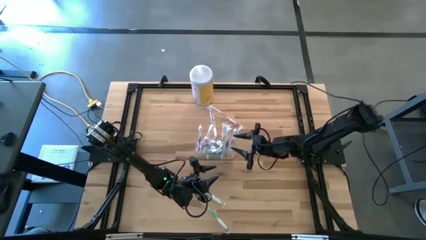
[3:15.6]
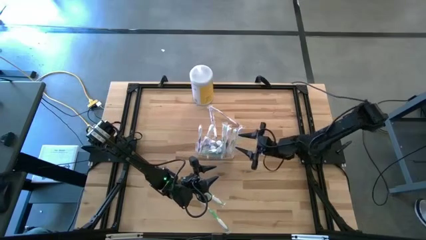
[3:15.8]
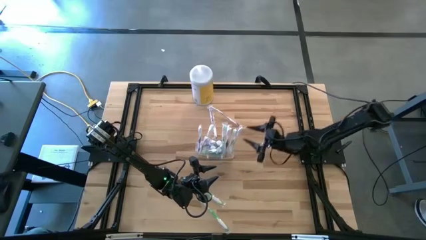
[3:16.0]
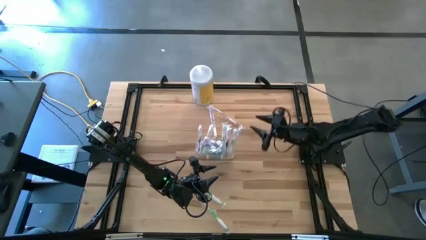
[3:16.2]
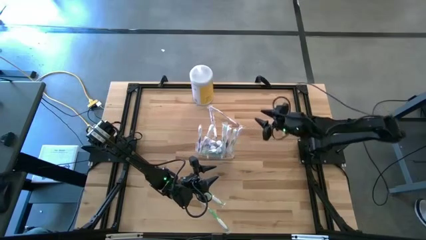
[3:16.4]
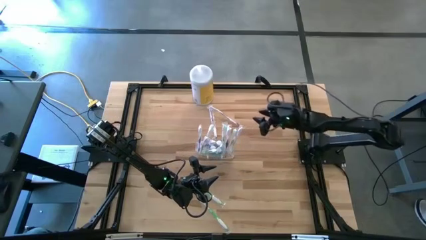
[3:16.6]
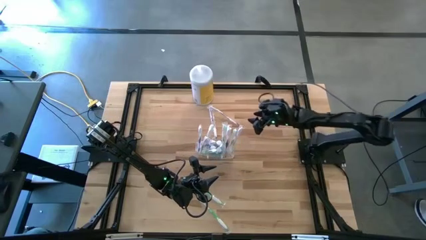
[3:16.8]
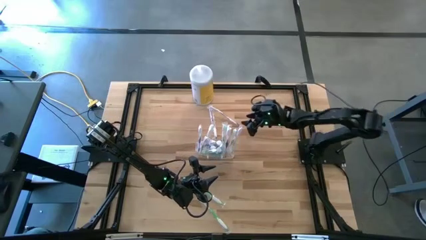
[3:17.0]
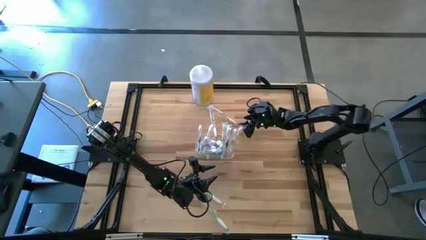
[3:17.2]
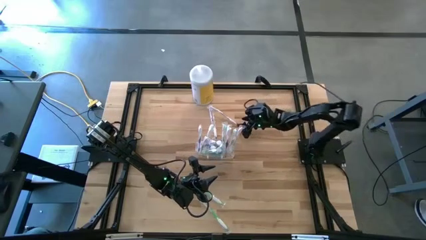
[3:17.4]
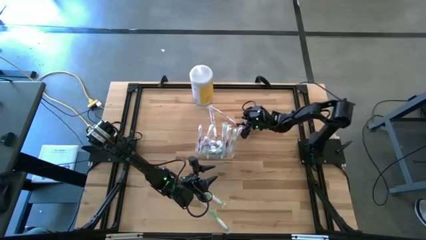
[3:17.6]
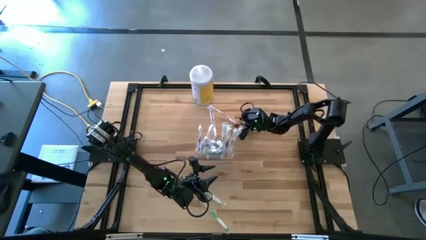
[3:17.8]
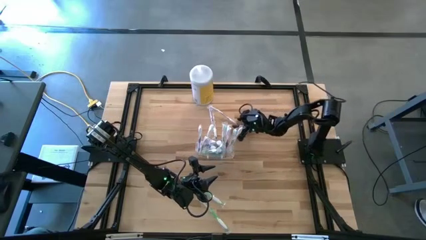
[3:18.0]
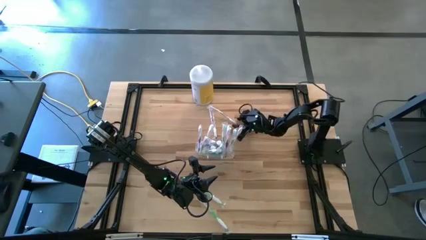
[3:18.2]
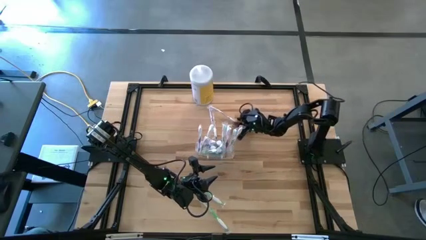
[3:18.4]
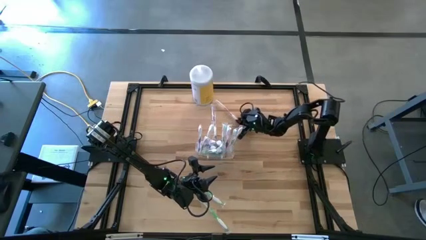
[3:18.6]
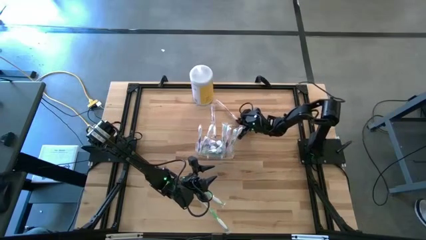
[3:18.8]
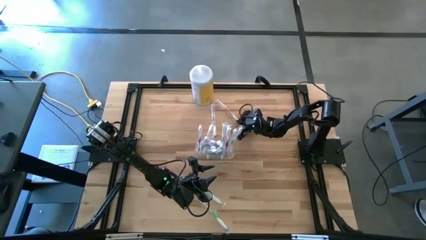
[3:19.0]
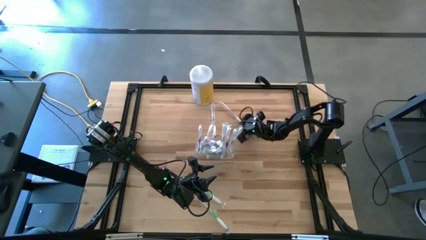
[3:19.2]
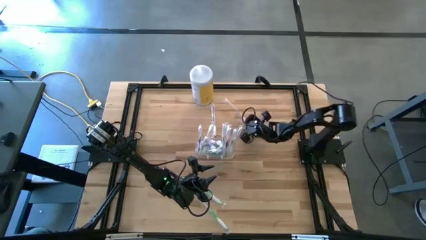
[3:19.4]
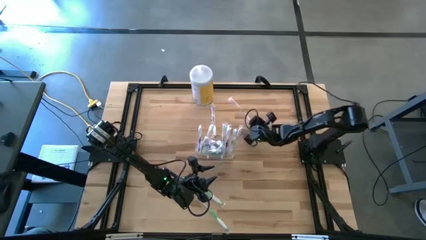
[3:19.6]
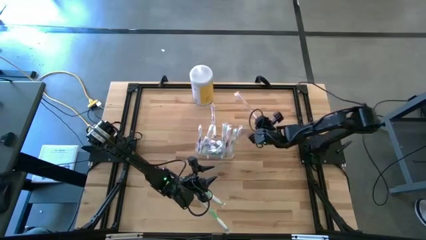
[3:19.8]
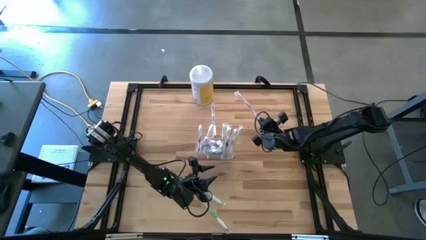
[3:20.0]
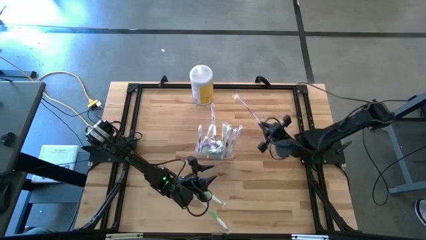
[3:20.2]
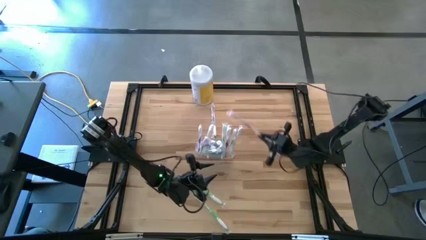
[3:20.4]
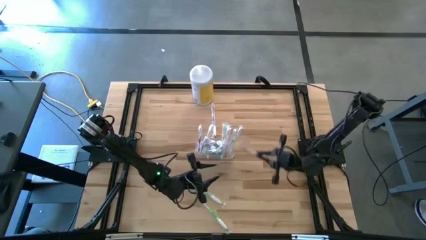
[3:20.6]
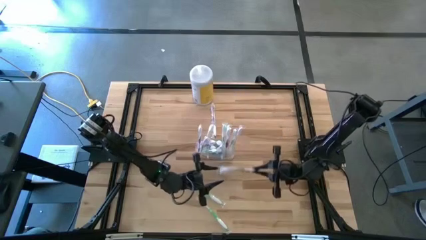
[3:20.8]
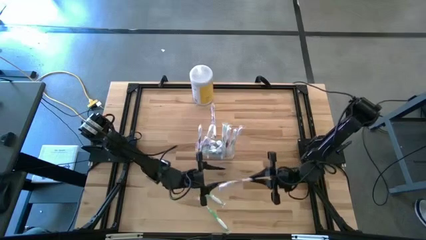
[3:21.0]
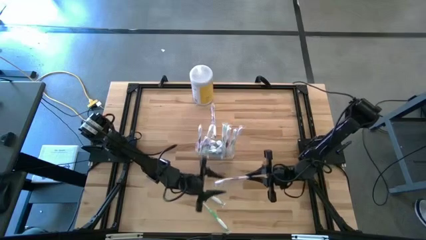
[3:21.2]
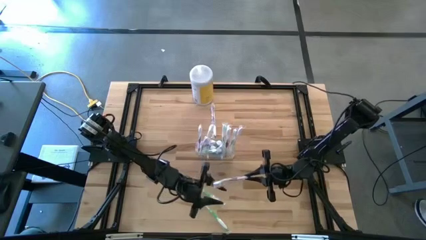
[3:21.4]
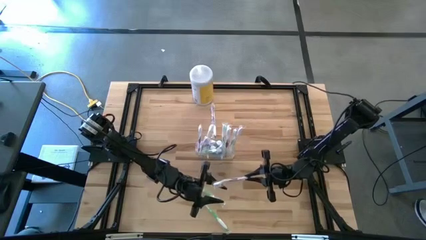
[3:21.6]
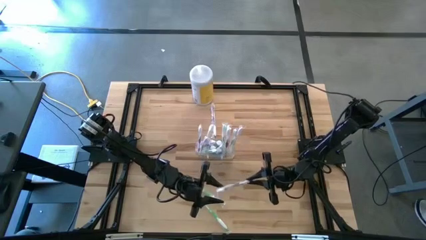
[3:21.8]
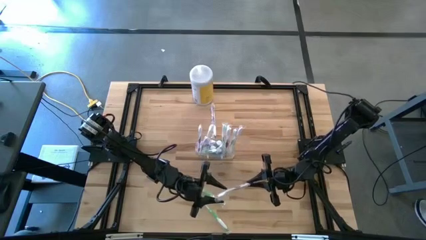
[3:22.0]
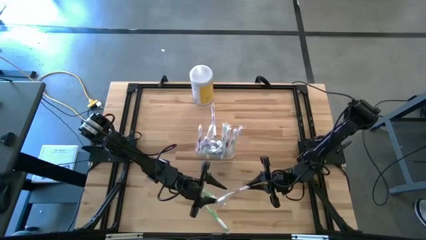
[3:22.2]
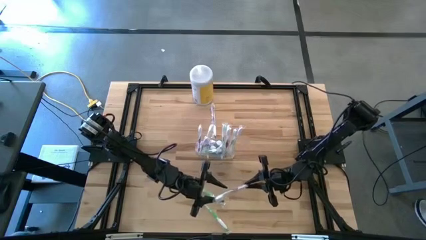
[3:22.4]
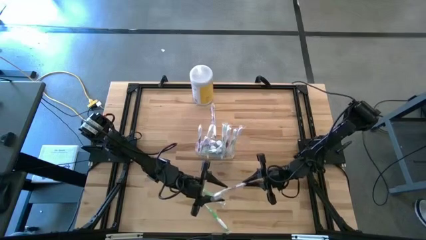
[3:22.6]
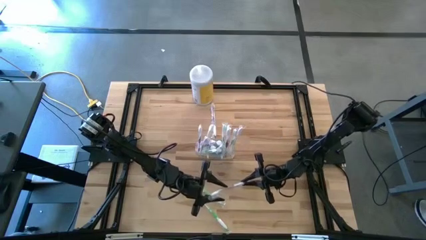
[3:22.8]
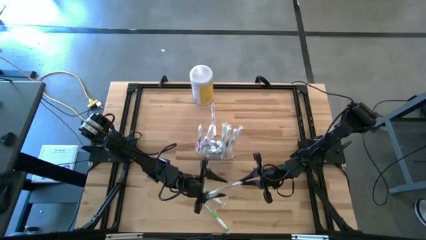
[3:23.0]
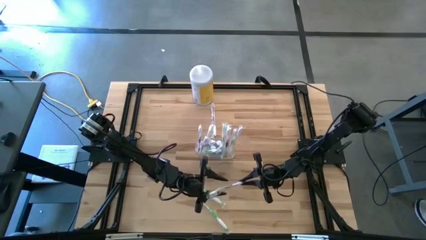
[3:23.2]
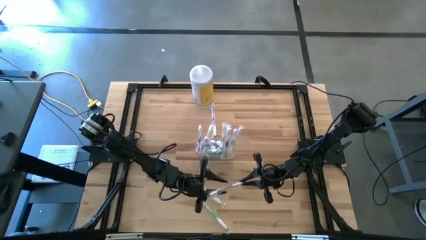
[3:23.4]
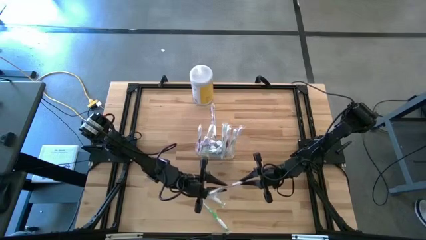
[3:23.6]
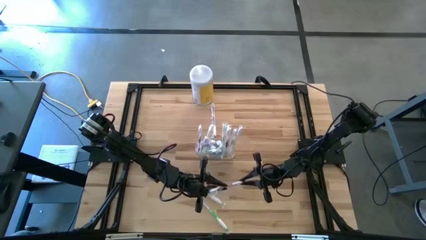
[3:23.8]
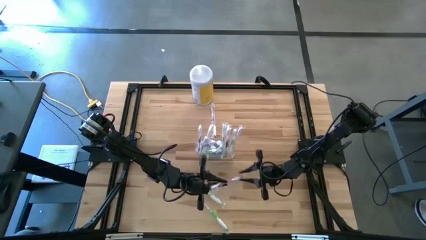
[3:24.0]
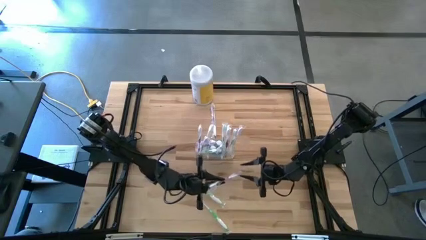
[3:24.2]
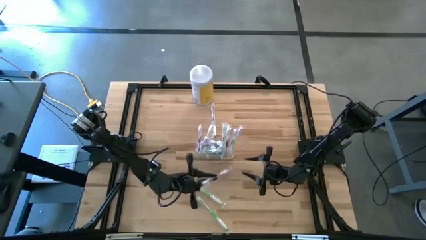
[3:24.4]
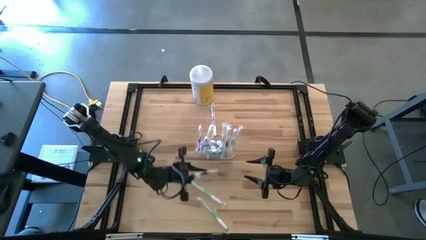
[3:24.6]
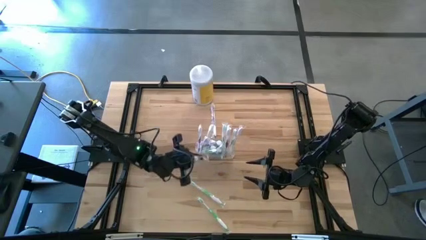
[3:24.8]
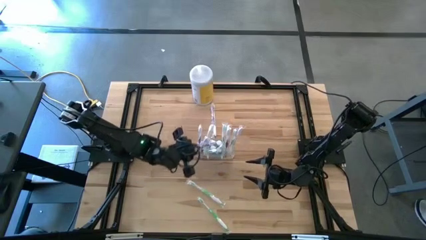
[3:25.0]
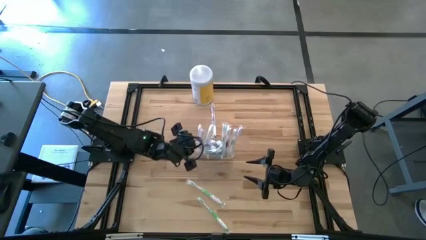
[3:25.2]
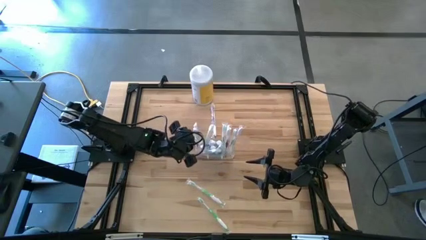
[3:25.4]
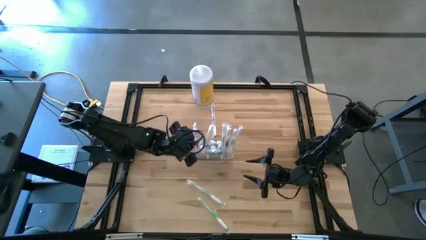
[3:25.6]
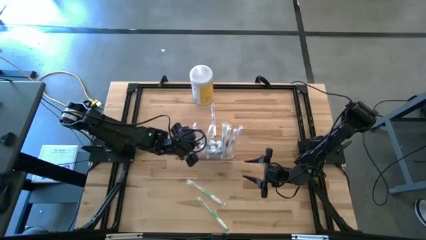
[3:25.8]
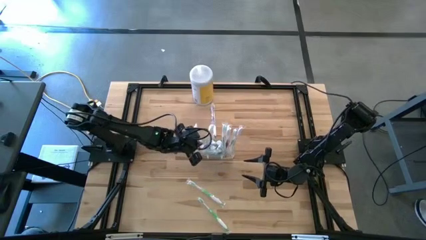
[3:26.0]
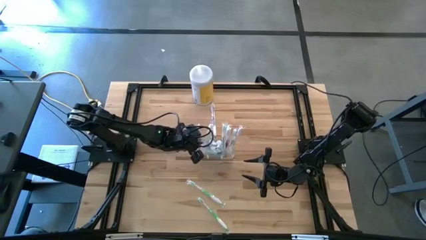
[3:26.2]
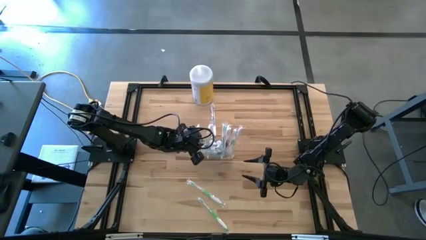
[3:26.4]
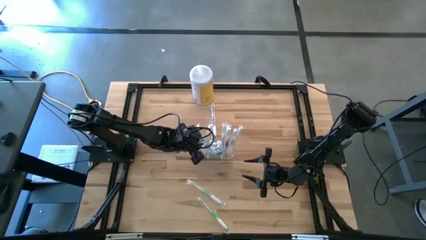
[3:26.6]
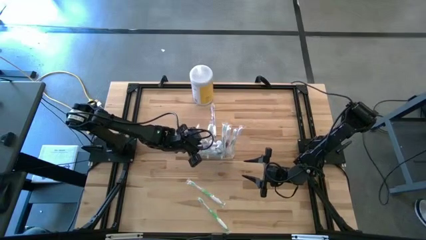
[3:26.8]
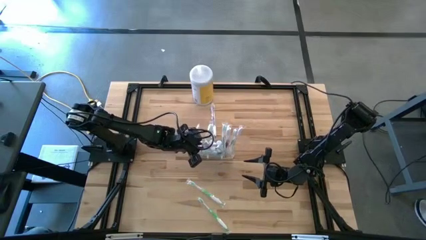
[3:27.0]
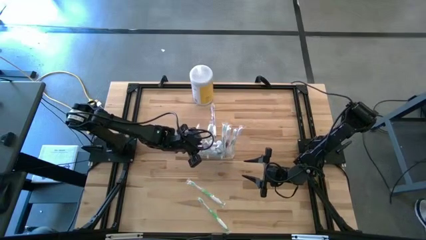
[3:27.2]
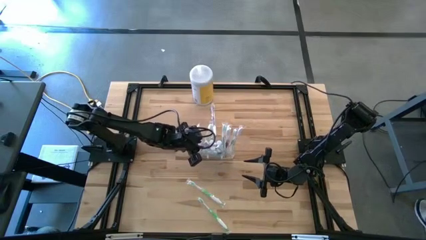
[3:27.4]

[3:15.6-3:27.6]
Task: Pick & Place toothbrushing station
Put the purple toothbrush into the transparent organizer

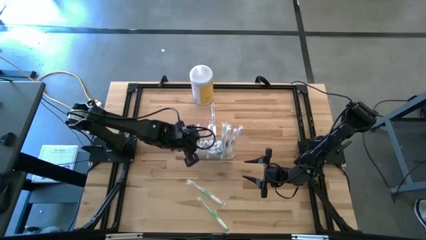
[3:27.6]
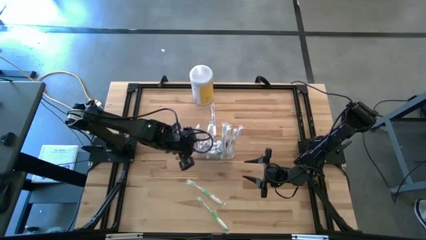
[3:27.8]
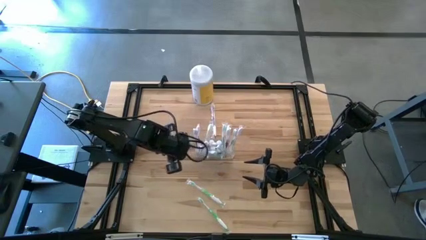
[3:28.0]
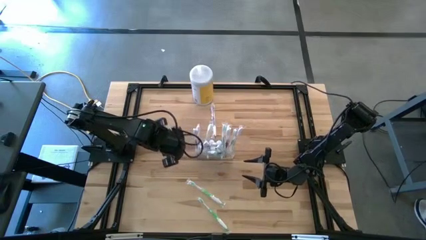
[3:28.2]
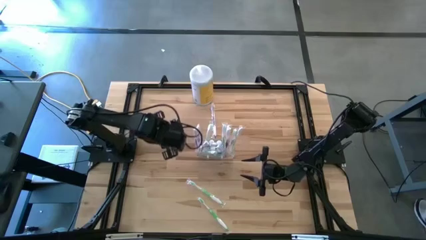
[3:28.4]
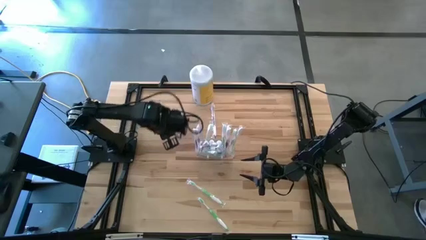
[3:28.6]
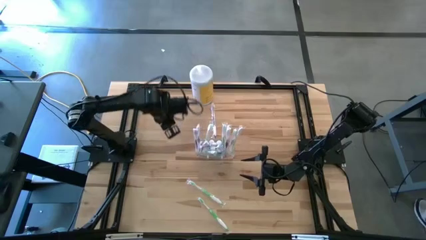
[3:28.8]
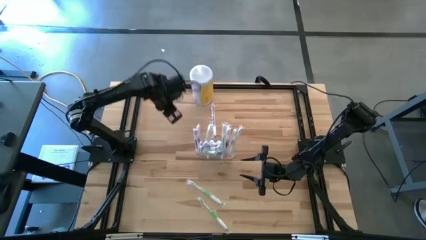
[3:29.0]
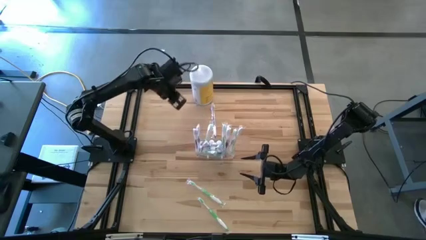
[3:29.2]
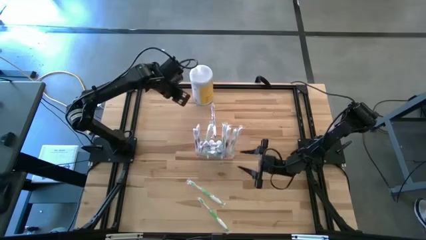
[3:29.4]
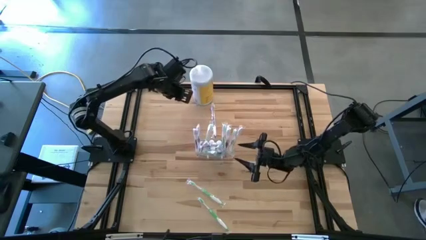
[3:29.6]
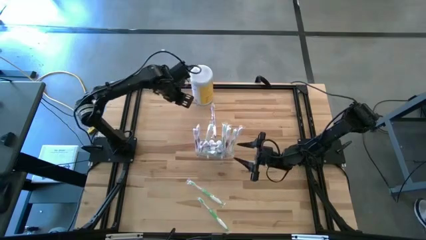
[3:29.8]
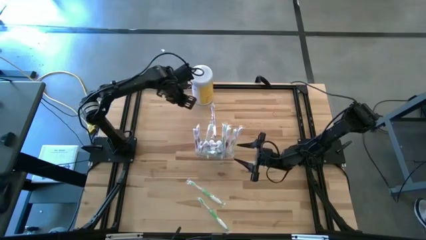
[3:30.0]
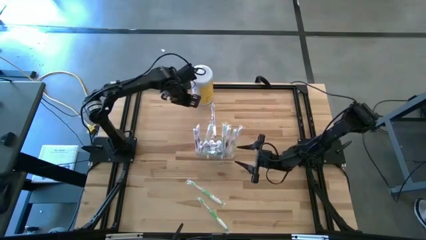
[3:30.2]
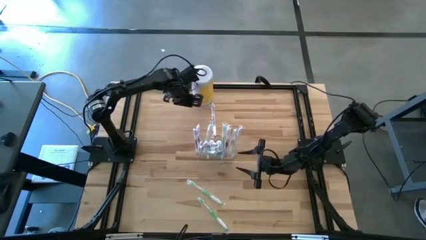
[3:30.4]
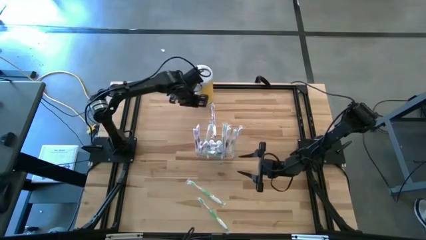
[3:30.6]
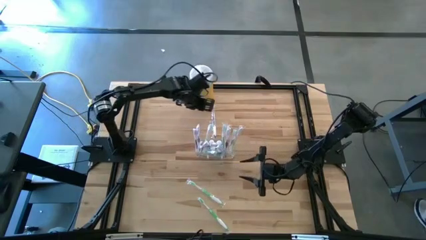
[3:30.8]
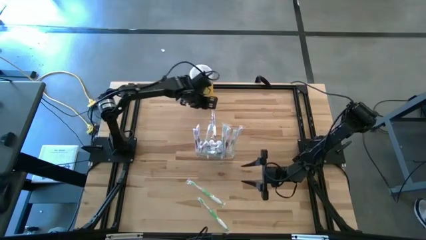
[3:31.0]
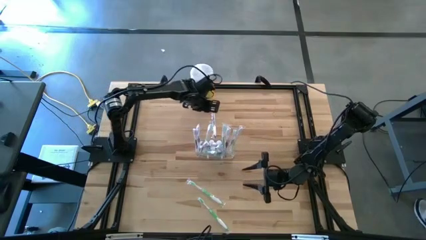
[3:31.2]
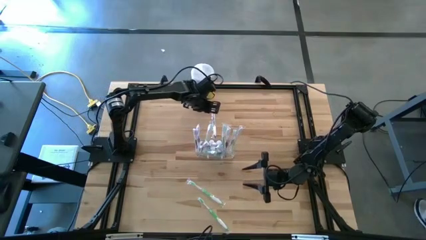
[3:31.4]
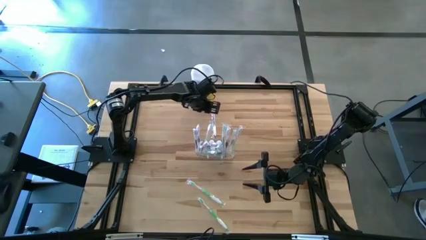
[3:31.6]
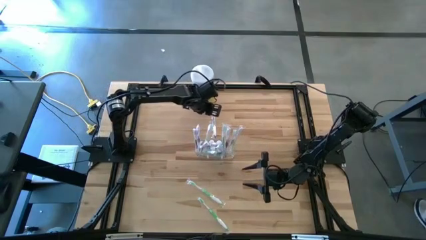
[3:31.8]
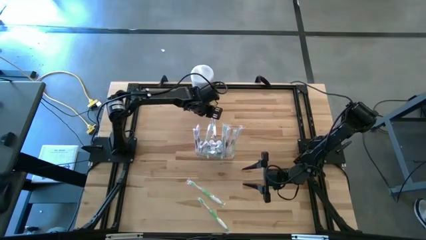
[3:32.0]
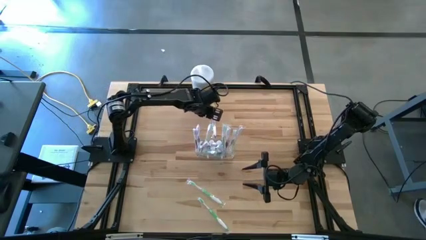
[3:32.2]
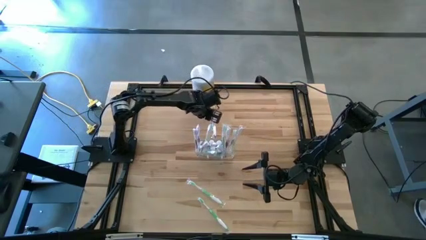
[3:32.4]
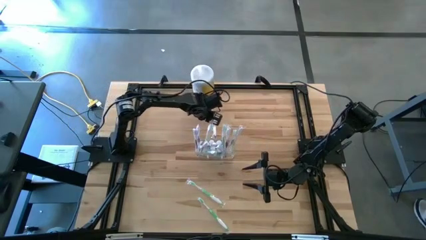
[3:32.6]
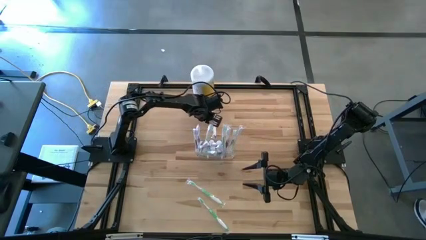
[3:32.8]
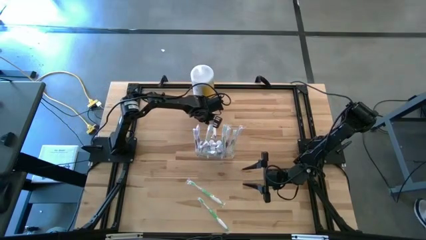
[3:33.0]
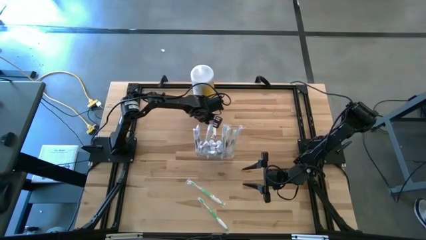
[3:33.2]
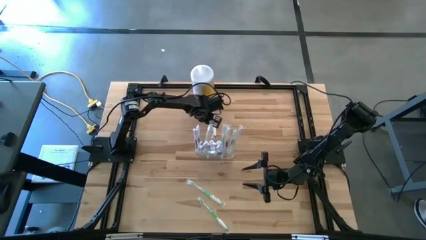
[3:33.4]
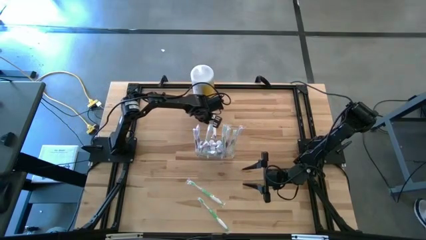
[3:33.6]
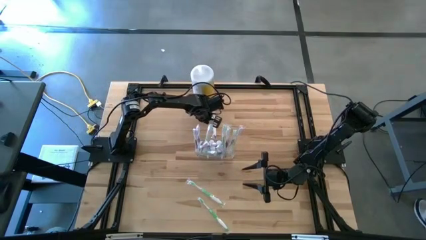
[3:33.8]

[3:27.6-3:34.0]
Put the purple toothbrush into the transparent organizer
